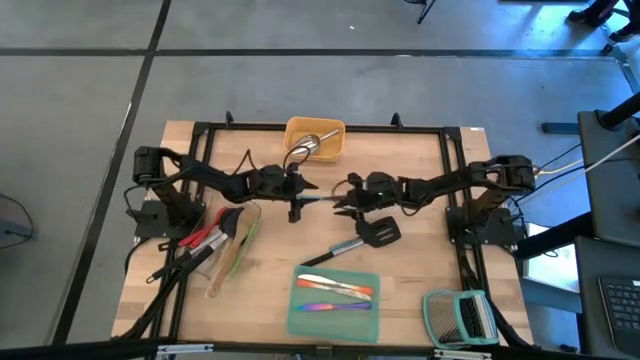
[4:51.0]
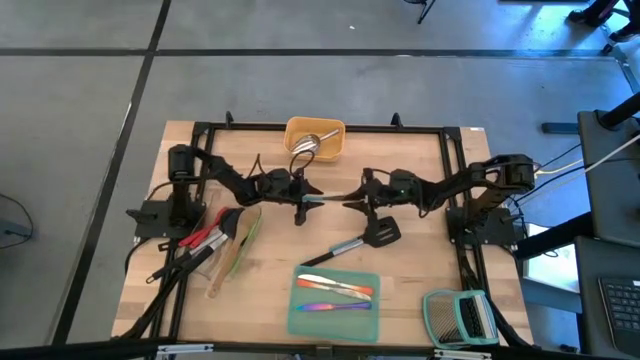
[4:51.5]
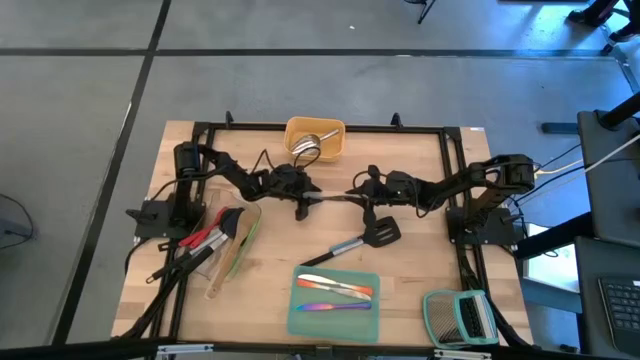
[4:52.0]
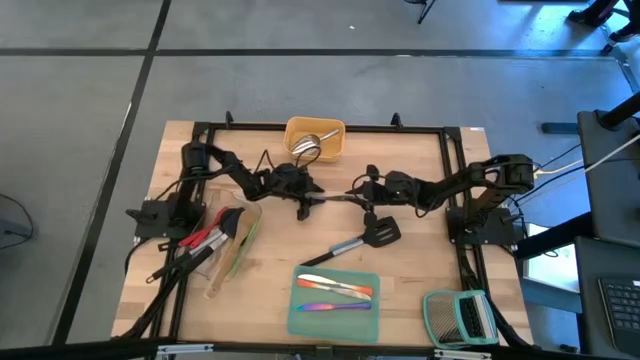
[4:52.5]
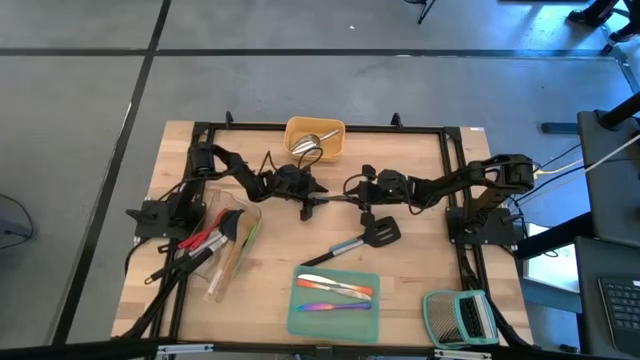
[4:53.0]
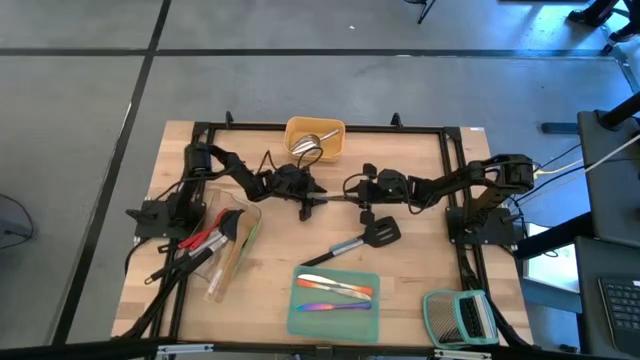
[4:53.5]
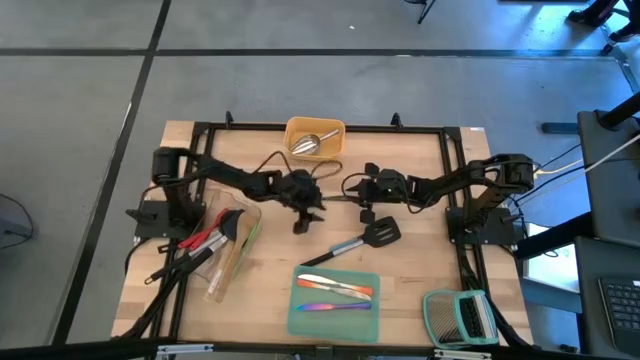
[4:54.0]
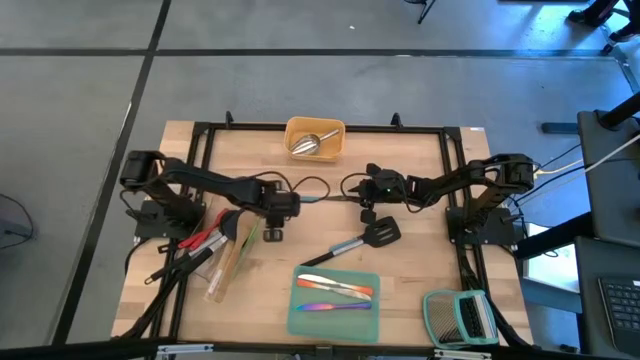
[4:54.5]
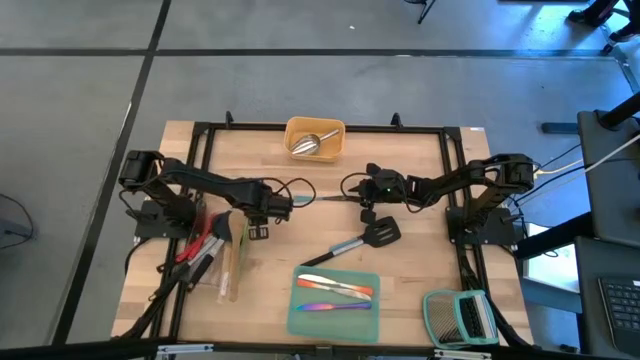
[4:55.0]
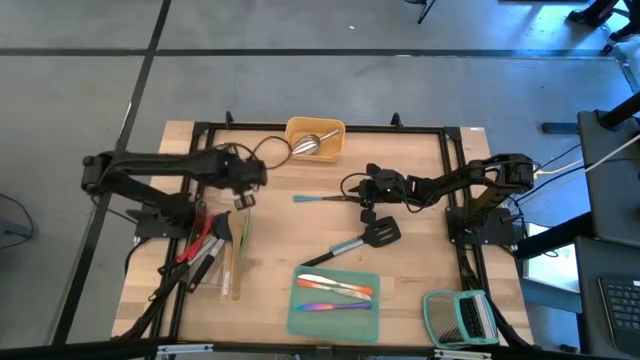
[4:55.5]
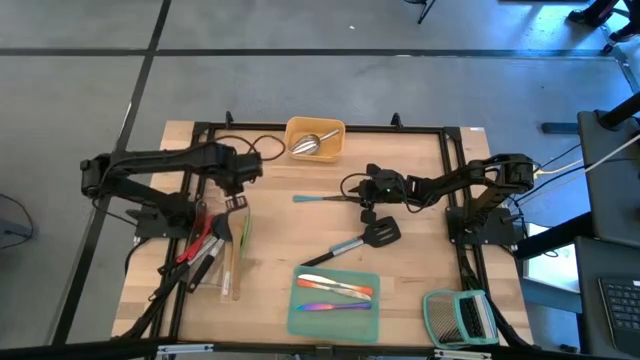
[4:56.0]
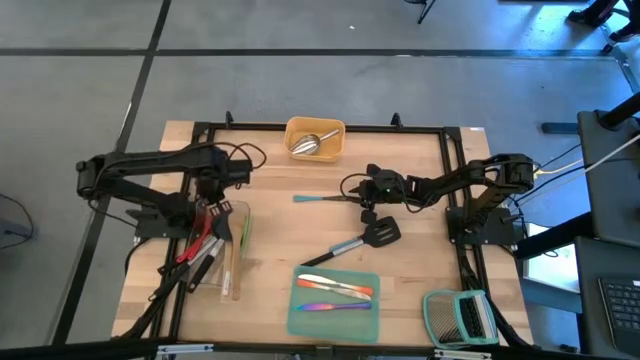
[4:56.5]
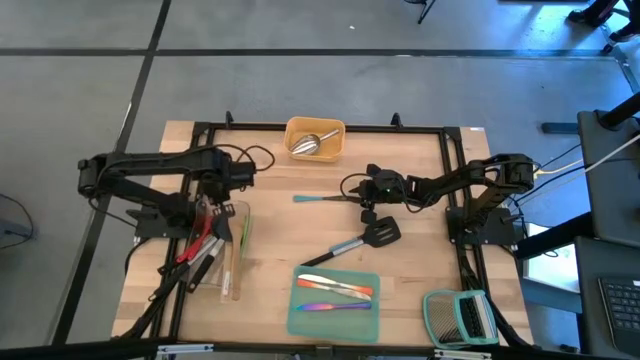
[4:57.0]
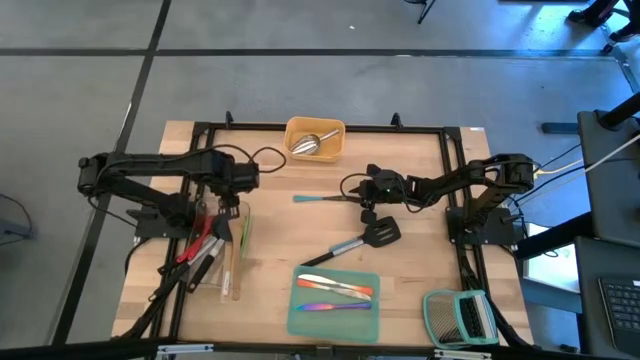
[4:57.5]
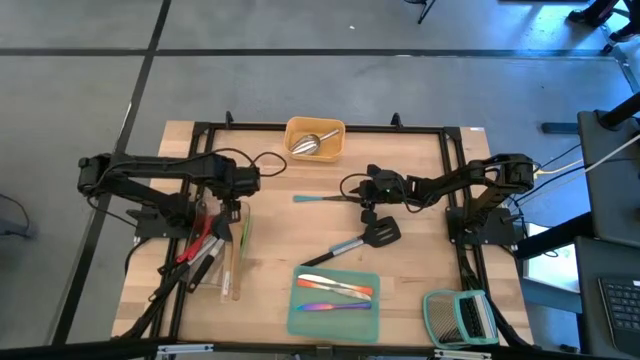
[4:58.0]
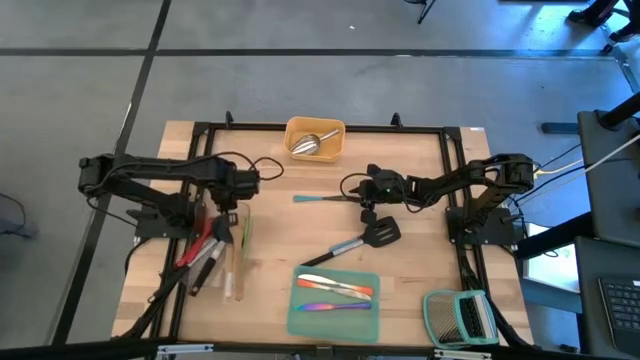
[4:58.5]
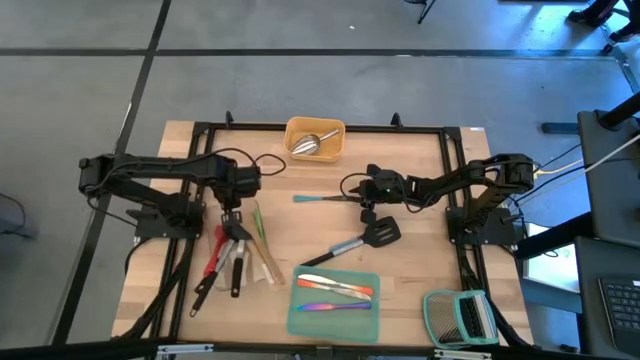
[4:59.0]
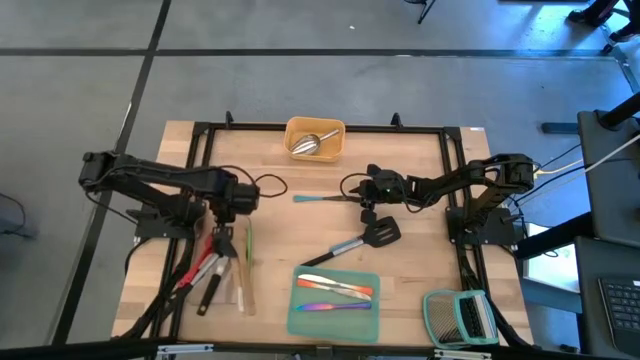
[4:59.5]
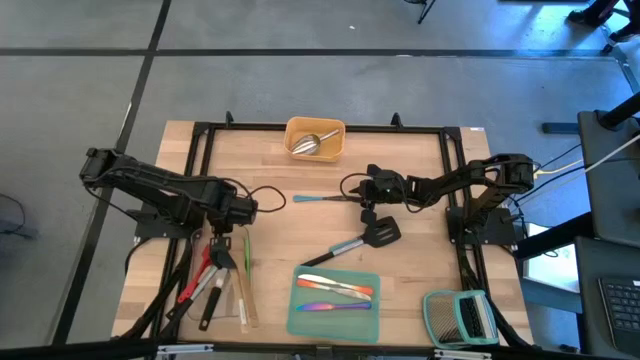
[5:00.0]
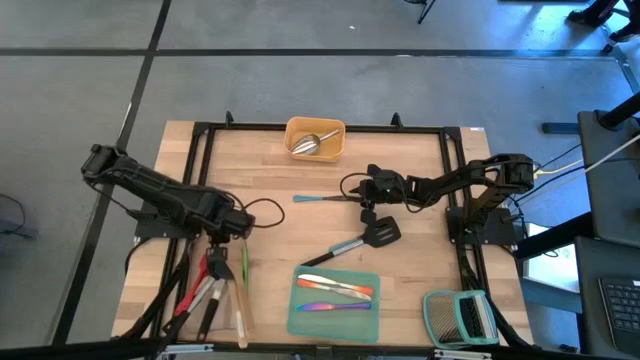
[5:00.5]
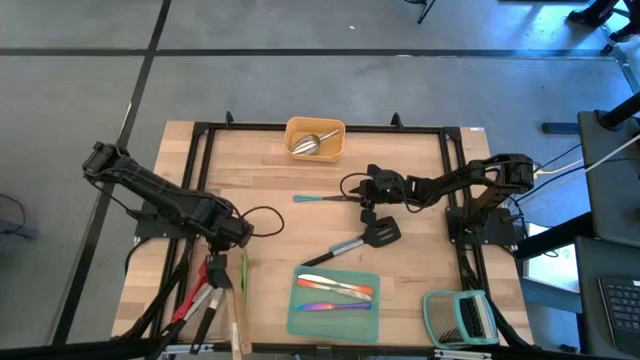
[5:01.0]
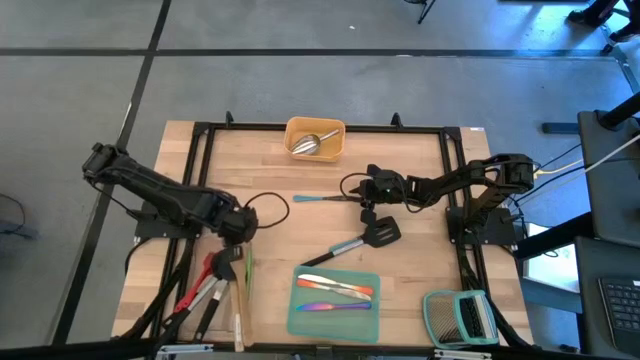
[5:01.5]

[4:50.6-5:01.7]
Task: Pick & Place Kitchen Items
Move the transparent bin to the bottom left of the table

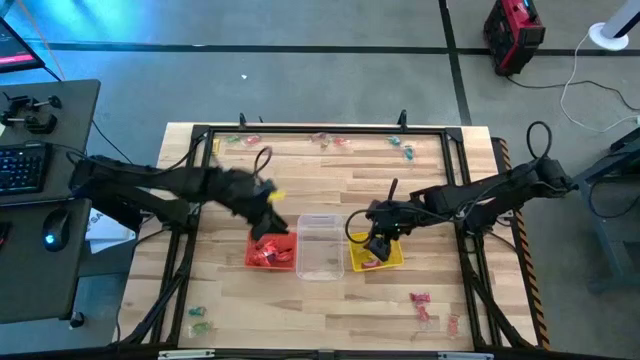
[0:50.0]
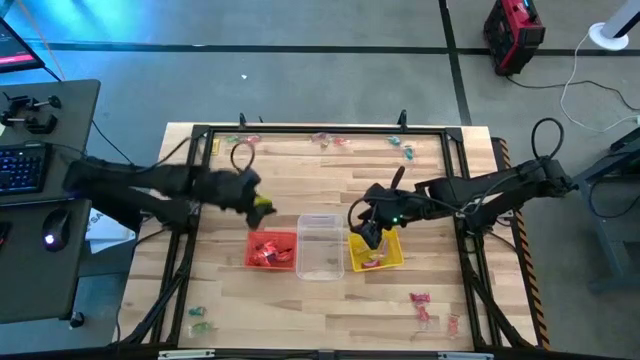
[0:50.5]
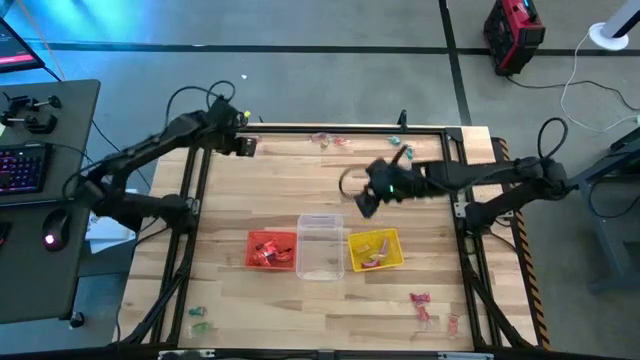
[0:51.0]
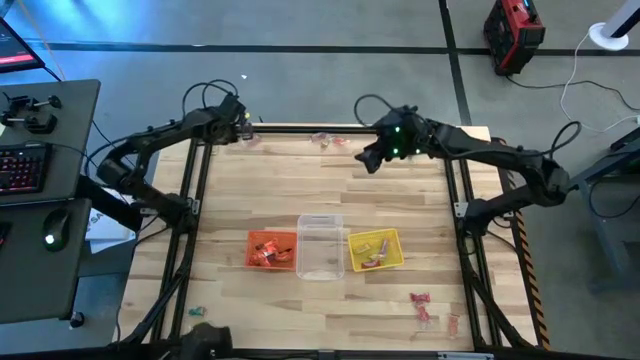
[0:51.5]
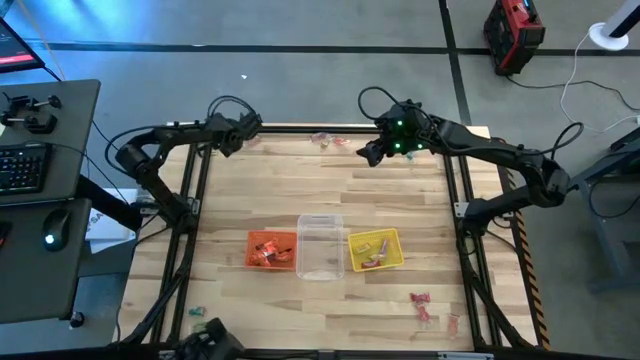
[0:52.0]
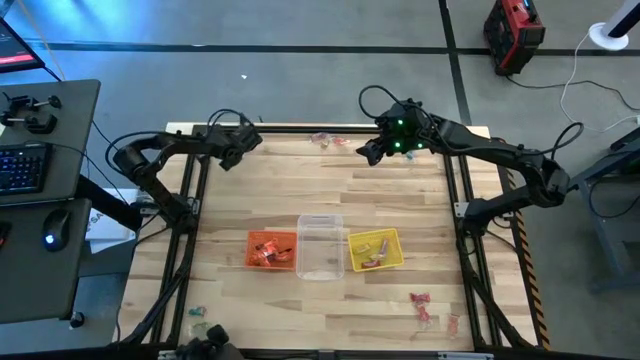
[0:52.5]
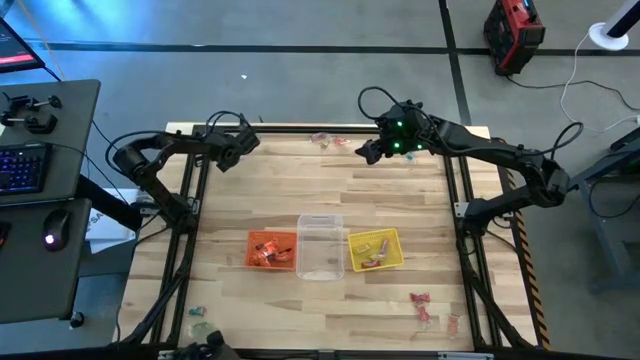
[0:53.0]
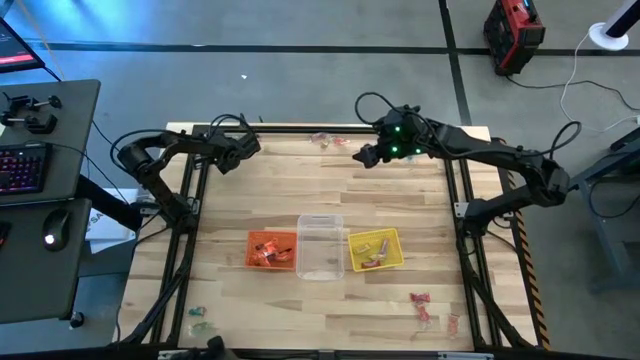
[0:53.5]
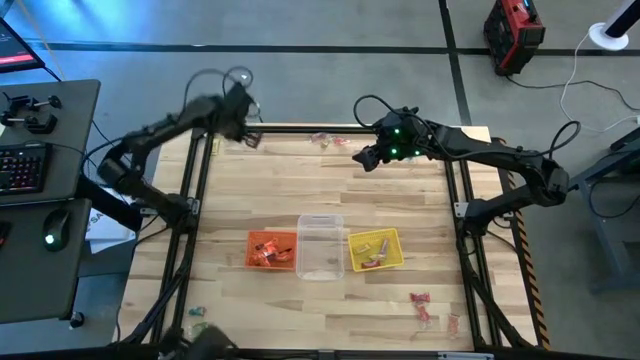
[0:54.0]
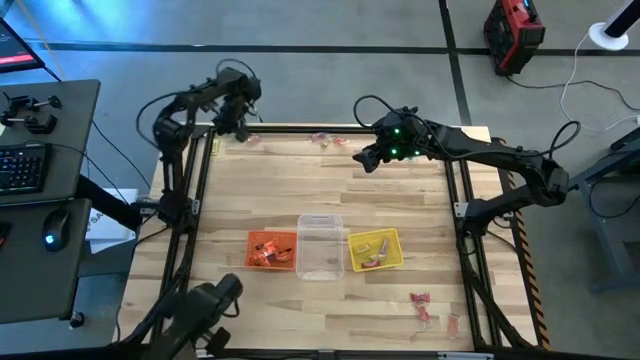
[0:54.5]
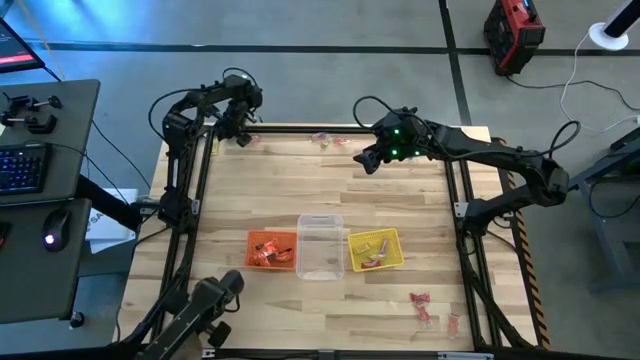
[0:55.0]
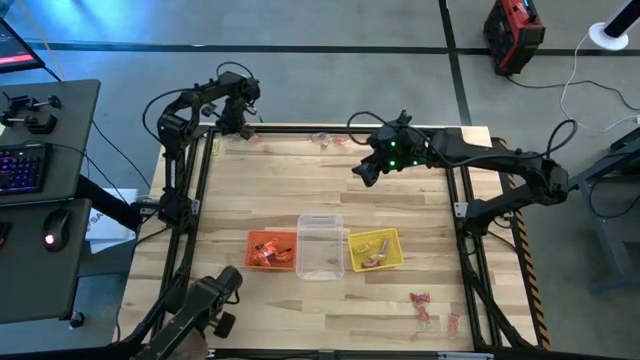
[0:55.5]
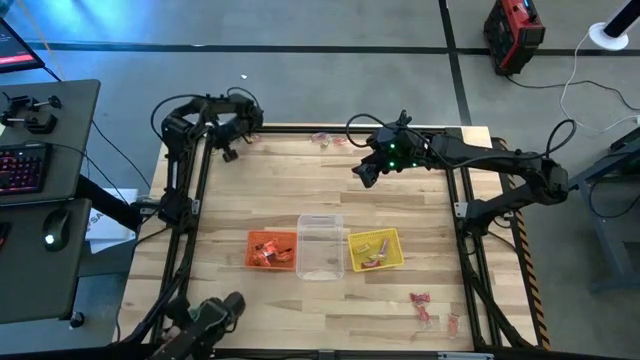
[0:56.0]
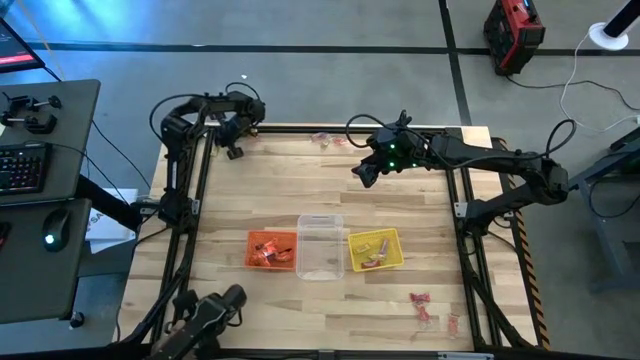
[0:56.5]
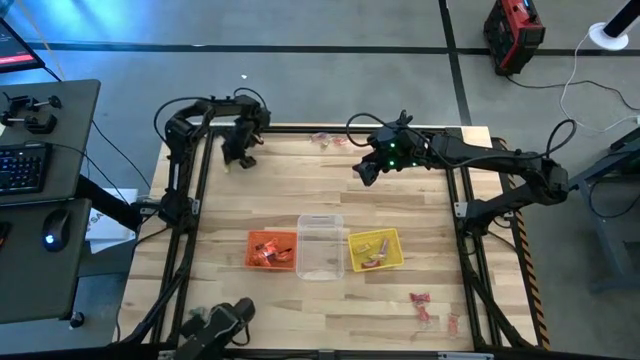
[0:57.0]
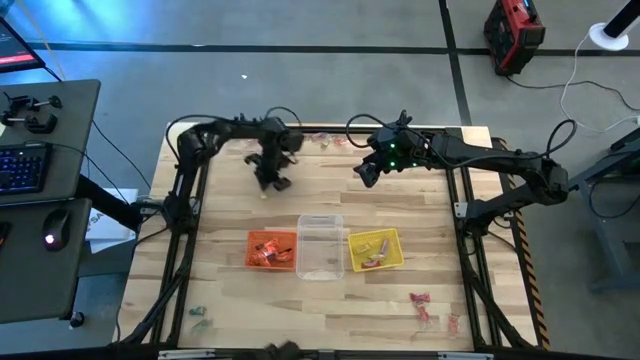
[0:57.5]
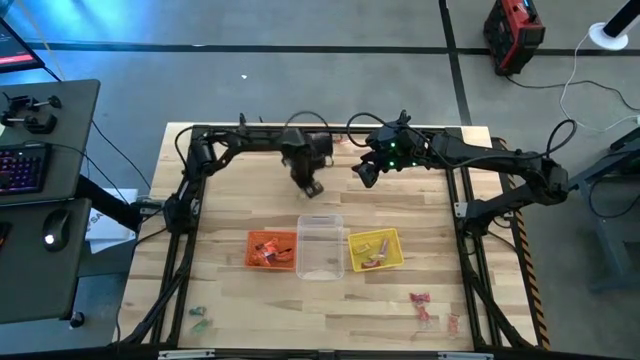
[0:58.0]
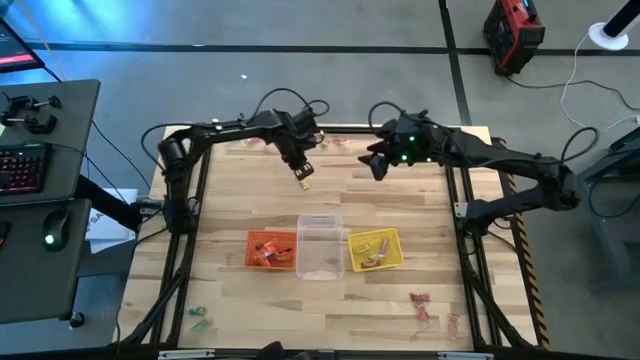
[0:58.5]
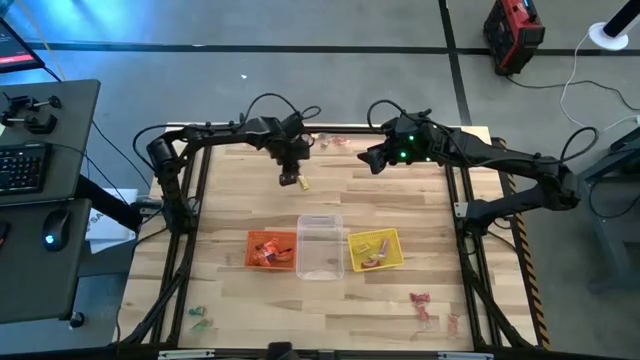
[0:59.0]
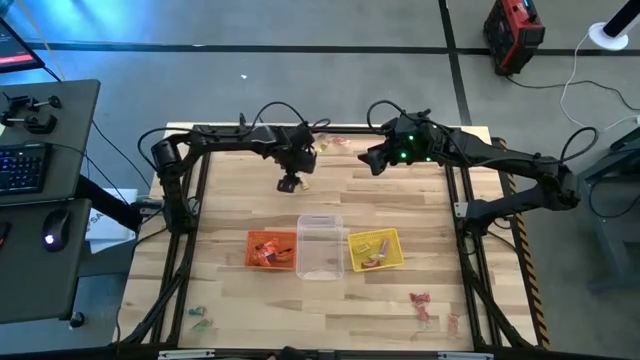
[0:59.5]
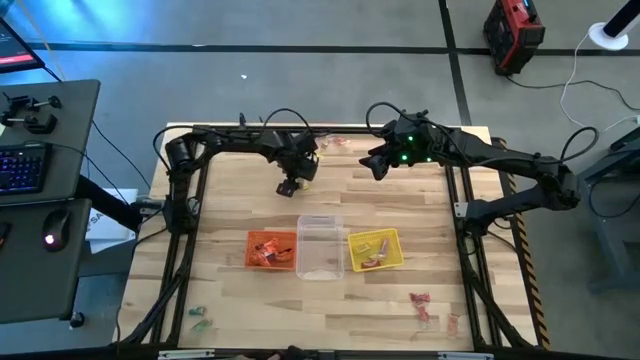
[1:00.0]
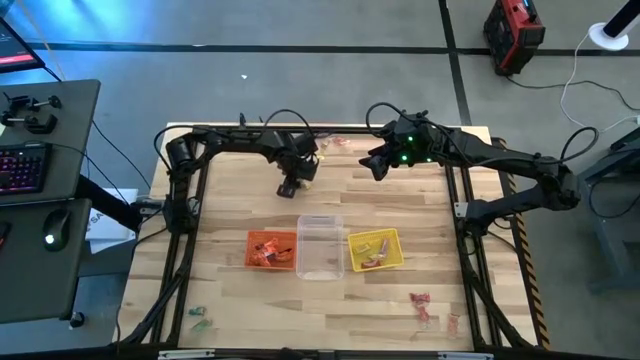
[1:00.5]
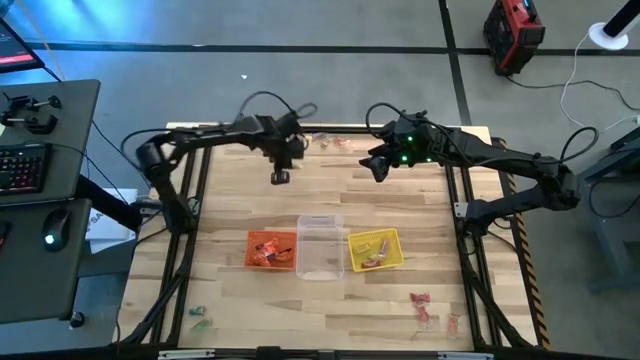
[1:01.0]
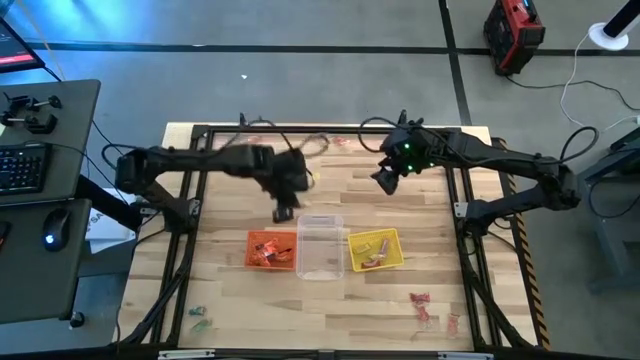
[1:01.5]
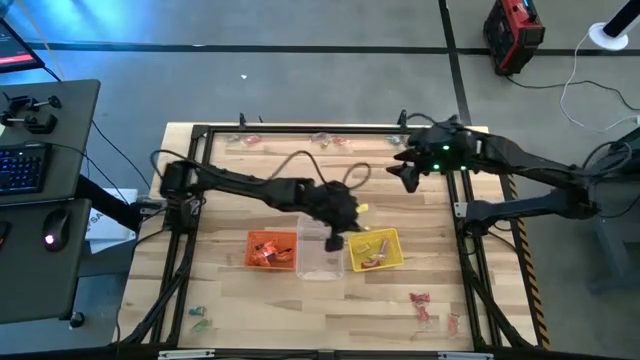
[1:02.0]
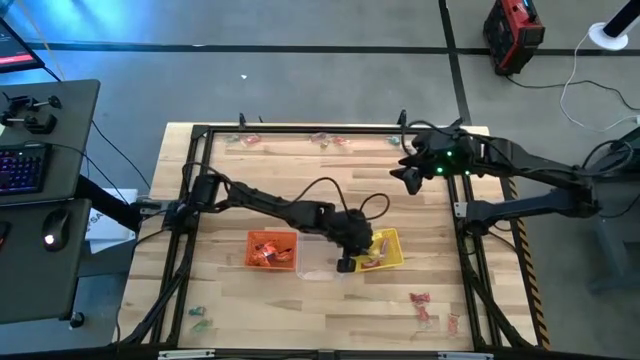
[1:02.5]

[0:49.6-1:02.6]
Task: Sort candy by brand, put in halloween buckets
Put the yellow candy into the yellow bin
